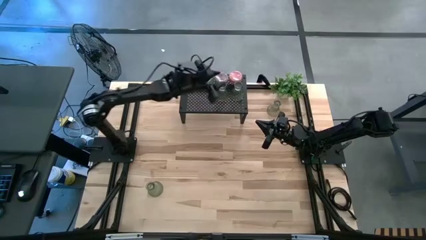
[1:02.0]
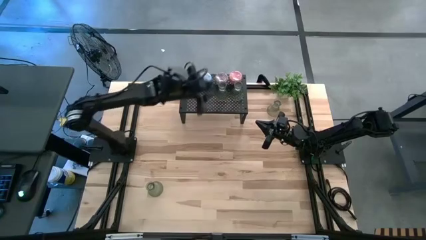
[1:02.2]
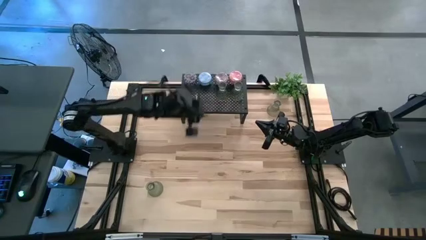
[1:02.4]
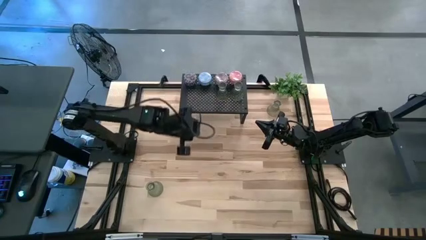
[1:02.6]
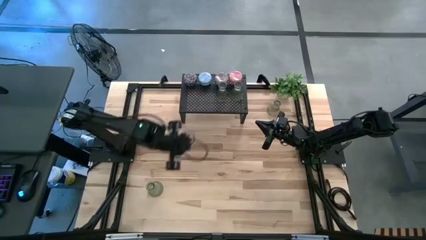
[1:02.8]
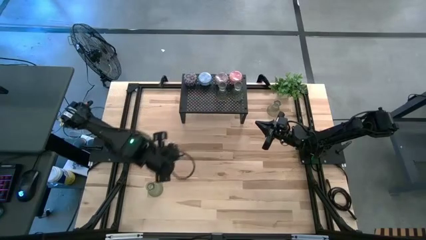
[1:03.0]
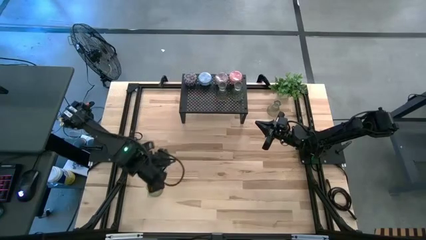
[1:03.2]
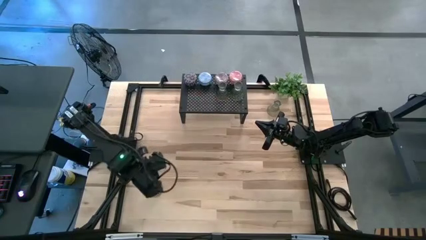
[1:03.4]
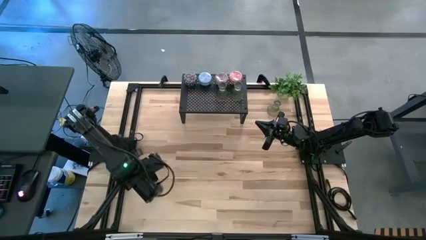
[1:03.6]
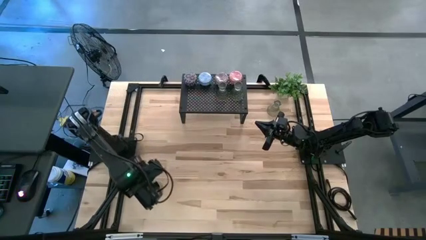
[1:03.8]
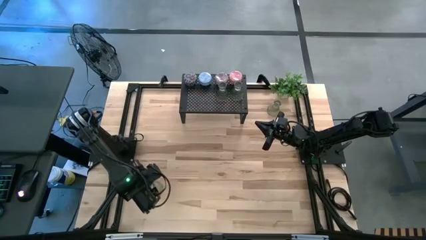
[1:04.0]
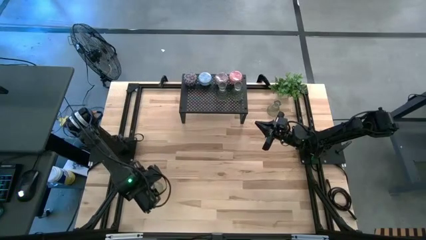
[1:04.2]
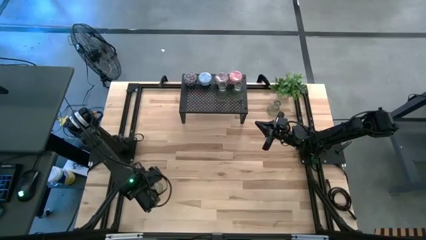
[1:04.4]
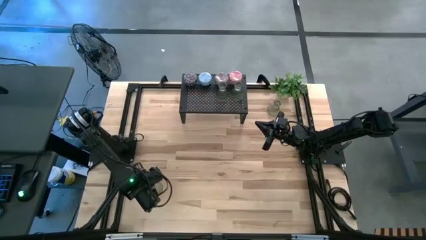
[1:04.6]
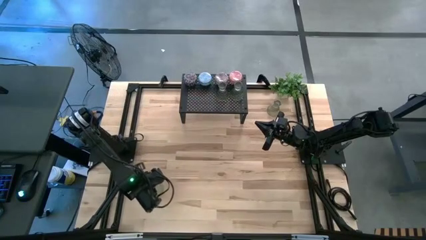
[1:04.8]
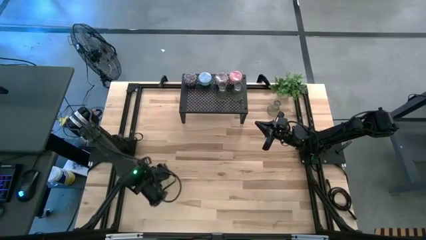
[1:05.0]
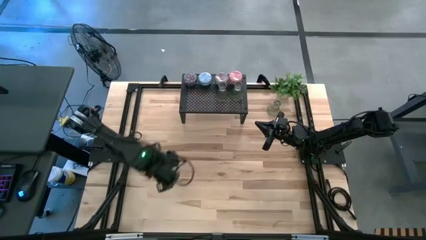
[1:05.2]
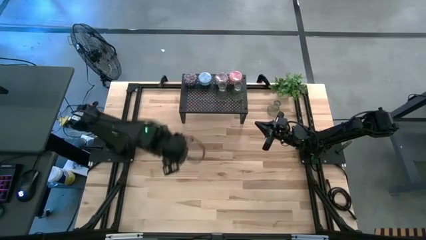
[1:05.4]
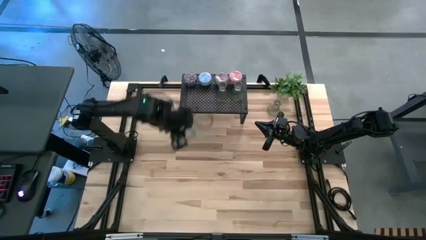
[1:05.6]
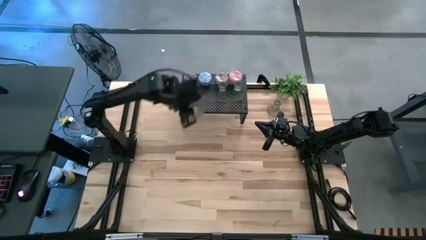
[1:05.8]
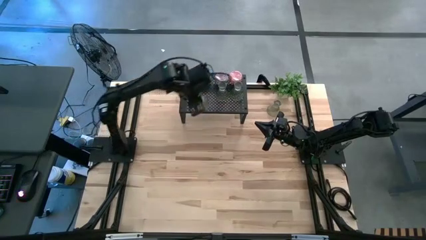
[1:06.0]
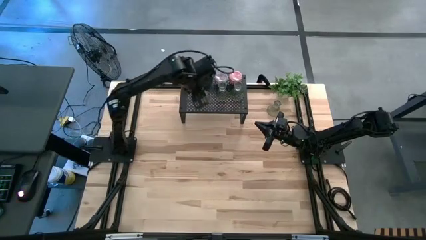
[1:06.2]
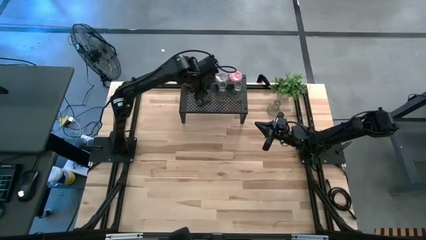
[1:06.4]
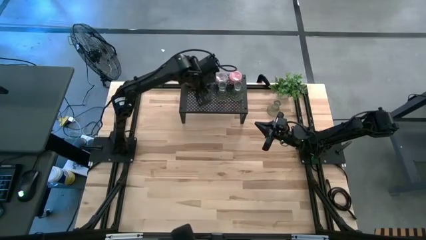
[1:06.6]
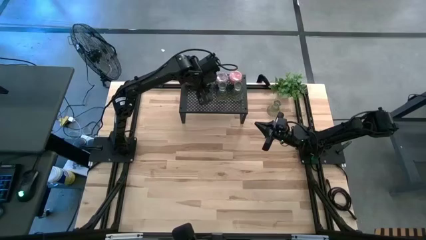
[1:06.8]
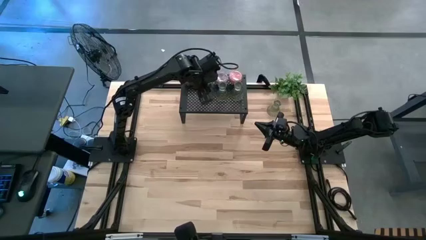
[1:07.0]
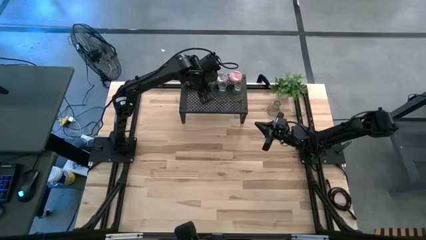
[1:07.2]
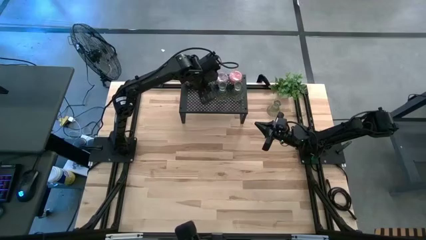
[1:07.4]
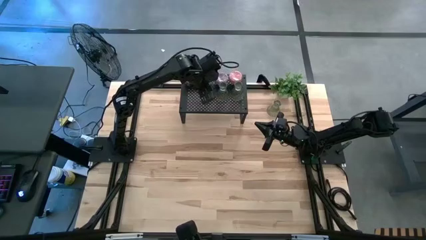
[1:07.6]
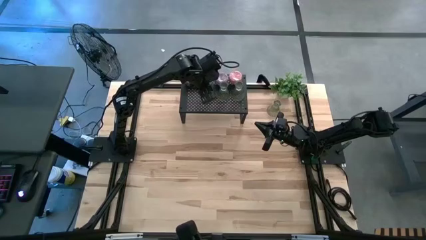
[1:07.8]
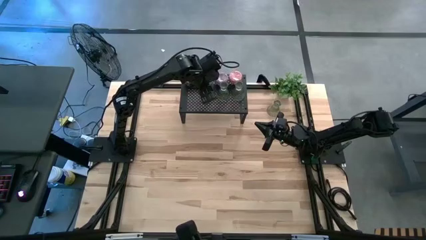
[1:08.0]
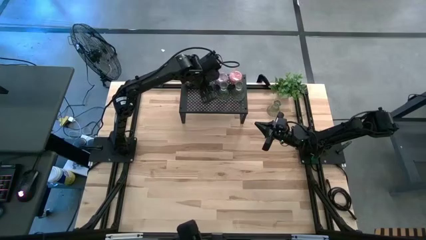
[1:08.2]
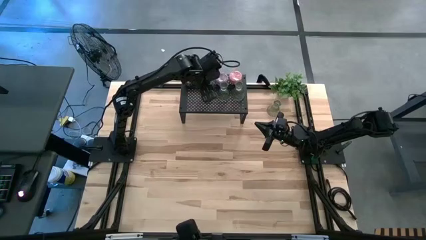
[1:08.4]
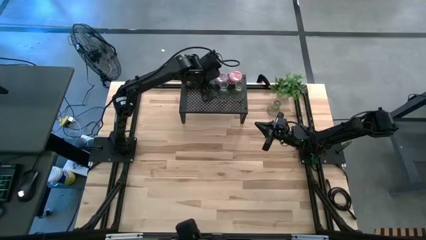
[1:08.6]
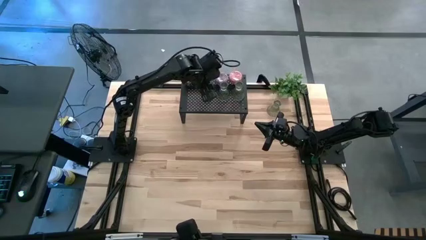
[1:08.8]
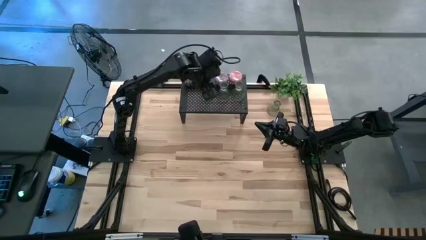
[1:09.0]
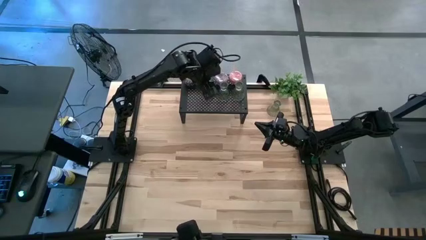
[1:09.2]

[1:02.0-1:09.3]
Task: Pick & Place candle stick holders
Align the candle holder with the other candle holder on the shelf

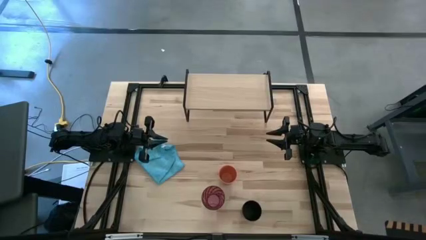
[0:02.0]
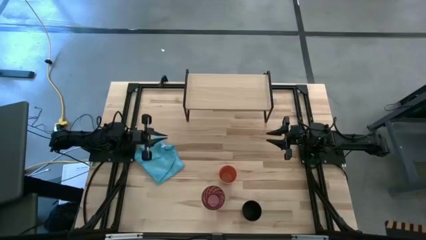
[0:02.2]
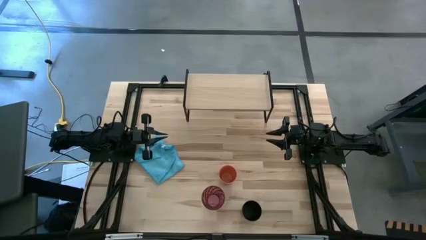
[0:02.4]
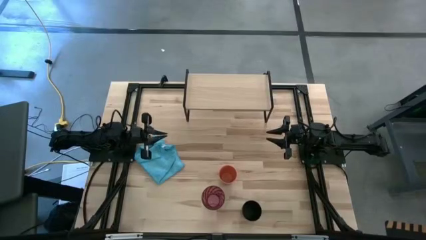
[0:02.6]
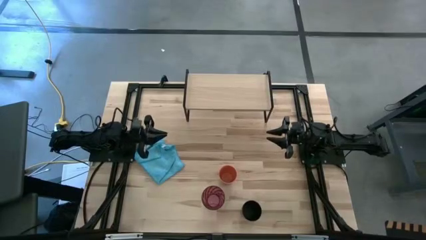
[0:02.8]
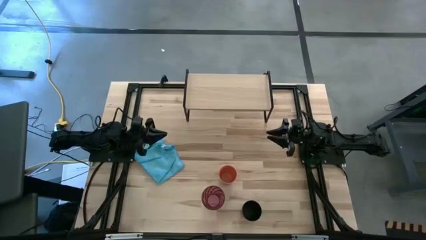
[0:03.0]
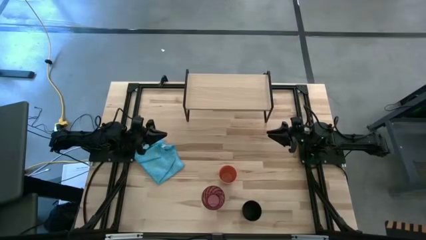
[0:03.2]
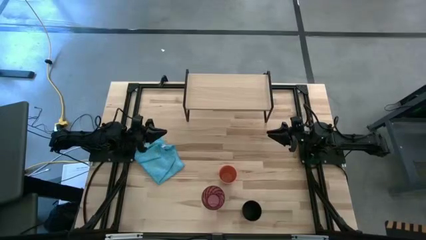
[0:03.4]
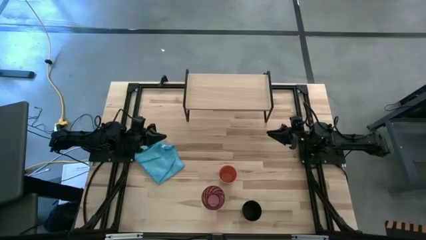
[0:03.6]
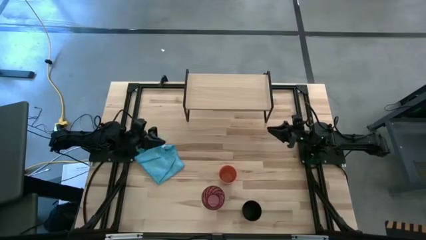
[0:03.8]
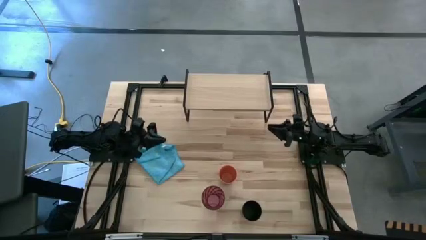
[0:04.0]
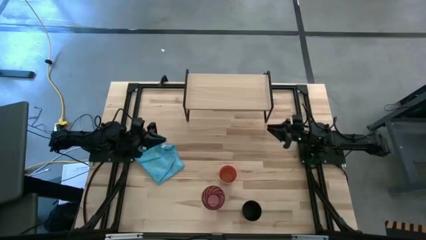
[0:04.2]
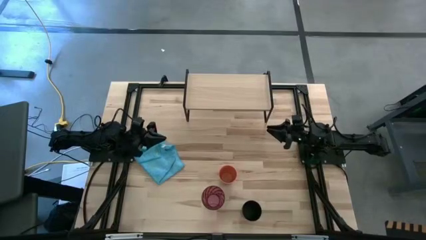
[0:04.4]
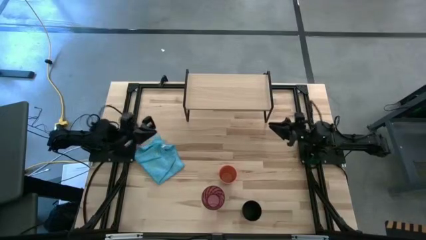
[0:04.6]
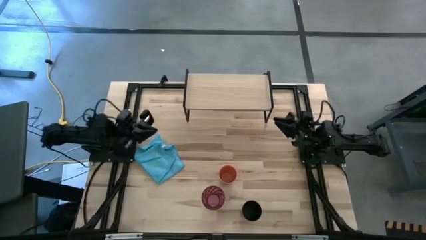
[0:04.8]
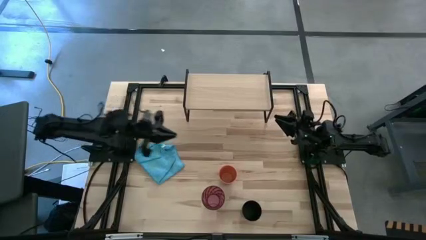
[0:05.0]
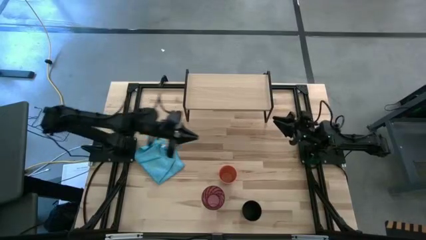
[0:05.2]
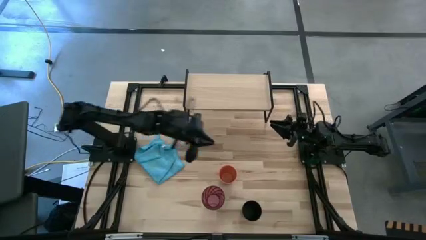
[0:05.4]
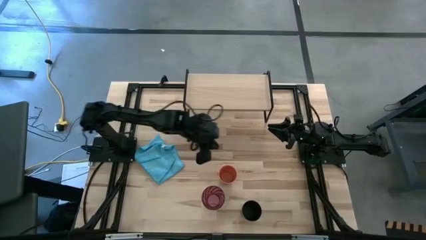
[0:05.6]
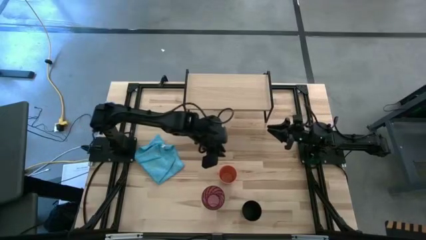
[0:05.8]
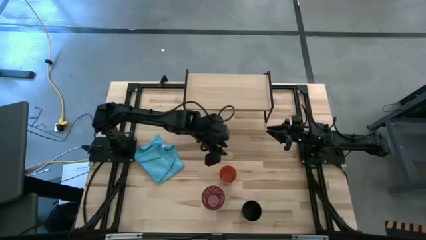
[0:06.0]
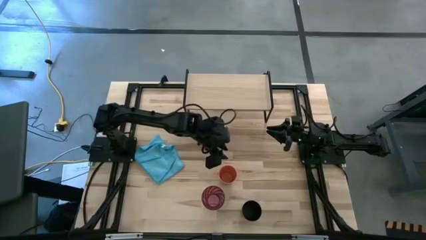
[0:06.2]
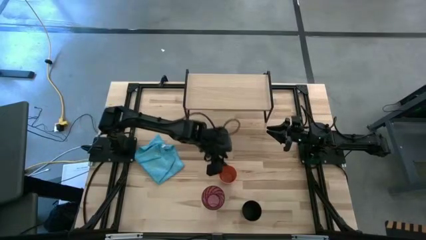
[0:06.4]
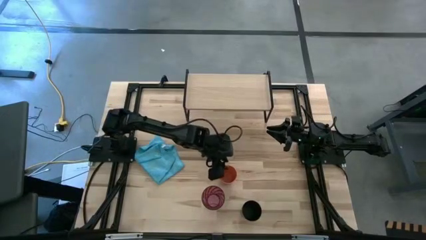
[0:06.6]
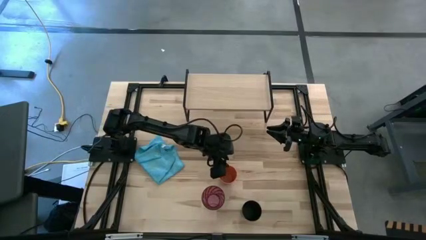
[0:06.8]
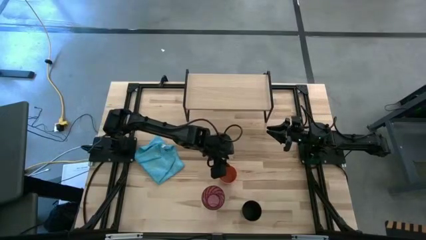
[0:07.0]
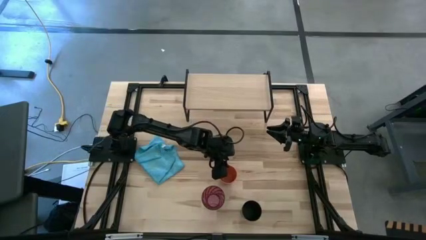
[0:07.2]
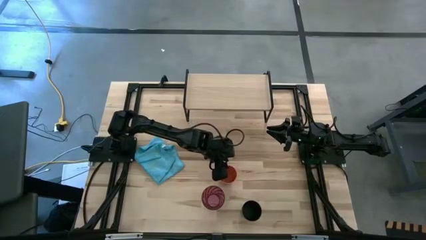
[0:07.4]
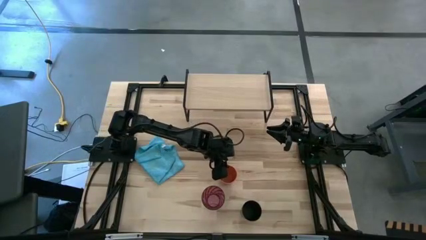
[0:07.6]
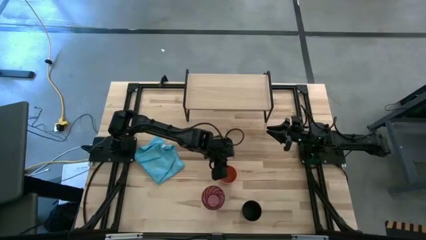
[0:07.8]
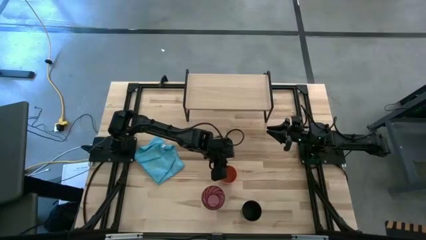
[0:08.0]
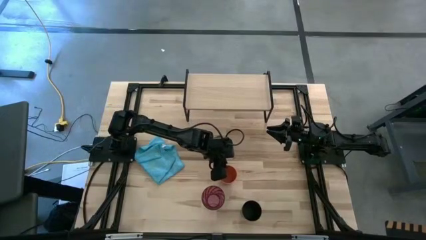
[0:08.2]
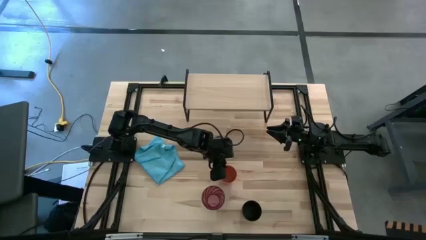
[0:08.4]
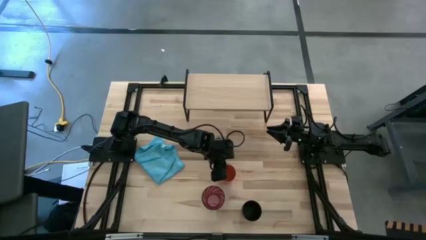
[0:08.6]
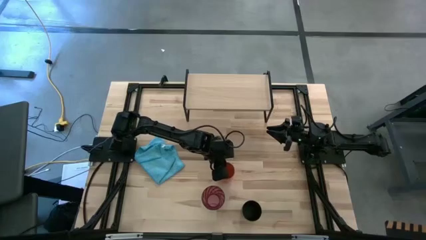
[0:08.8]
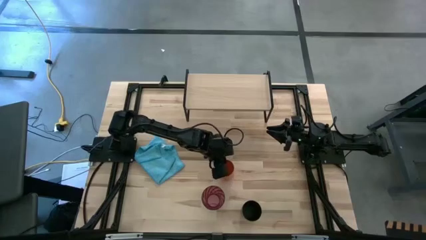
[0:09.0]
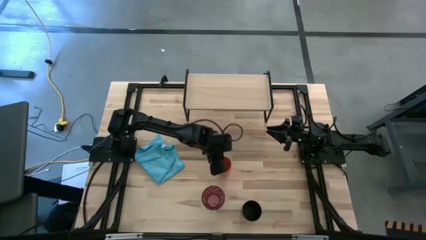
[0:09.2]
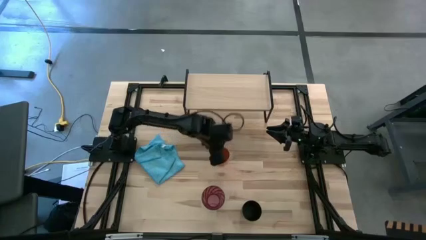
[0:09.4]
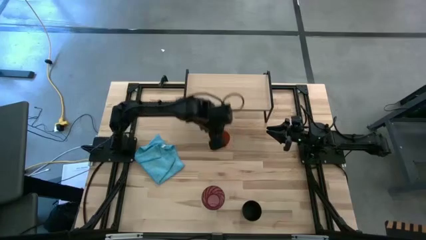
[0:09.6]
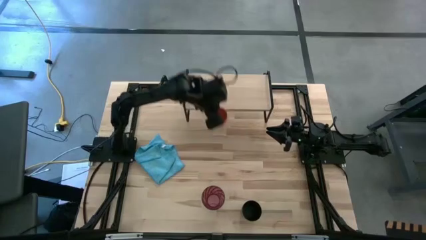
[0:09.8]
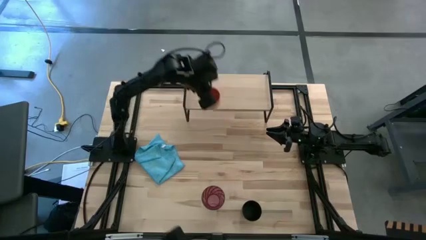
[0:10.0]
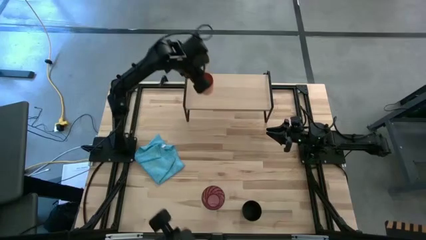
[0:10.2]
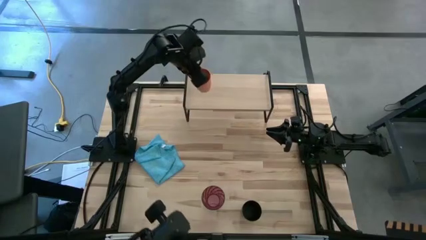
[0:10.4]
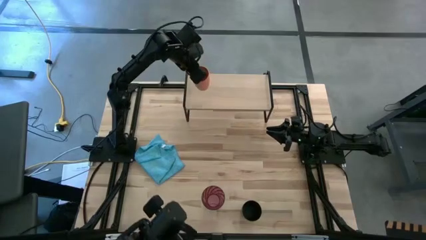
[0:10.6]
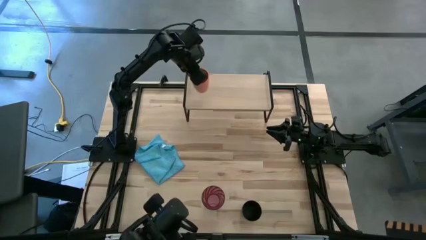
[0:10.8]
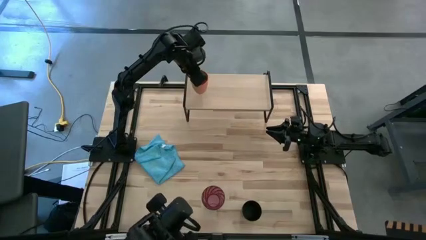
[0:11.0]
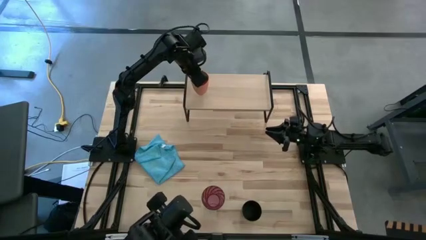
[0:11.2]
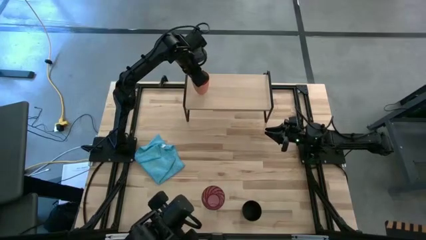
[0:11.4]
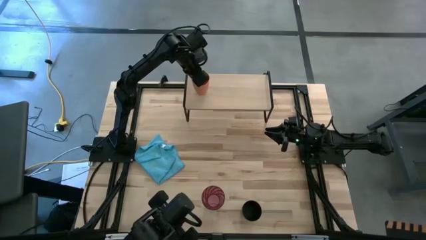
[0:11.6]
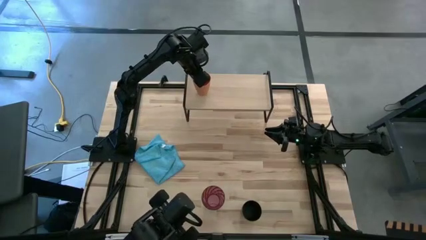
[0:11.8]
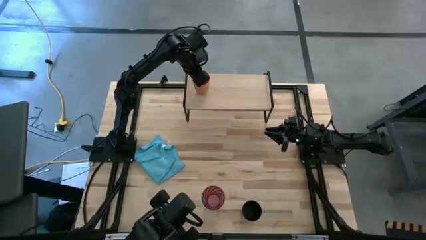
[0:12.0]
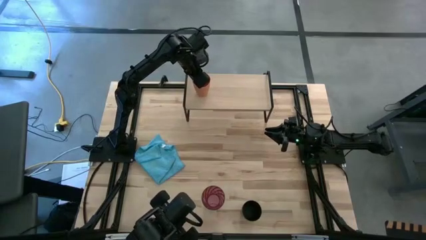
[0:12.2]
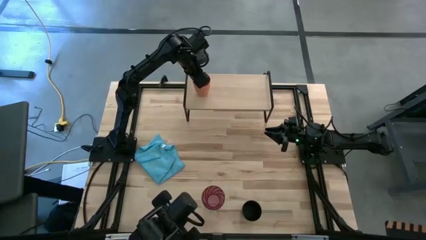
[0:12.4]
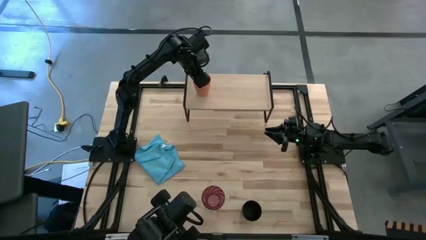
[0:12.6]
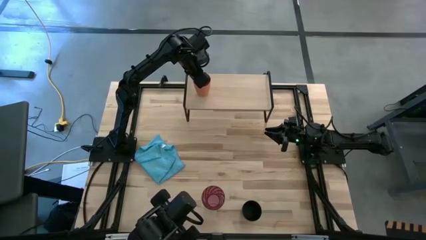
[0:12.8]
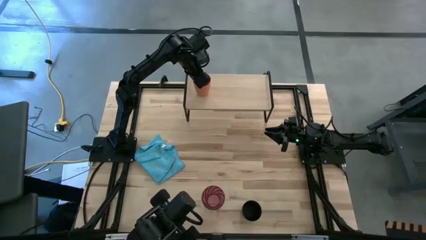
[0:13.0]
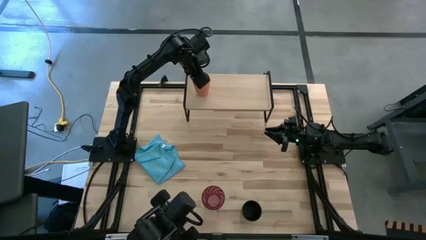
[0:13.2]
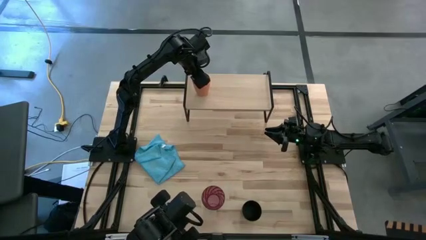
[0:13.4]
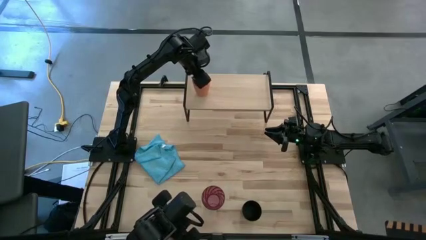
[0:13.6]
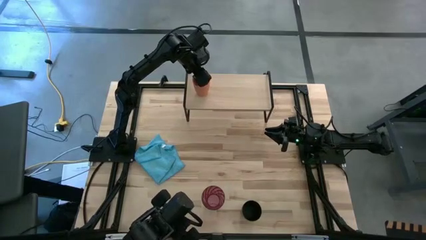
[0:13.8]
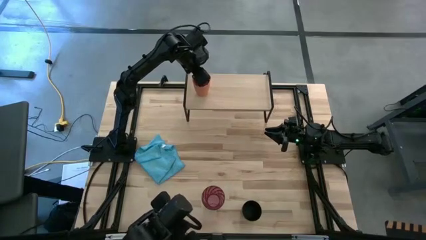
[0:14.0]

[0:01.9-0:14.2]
Task: Stack small to large cups/mugs on shelf
Put the orange cup on the shelf
